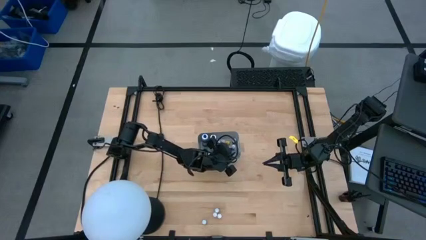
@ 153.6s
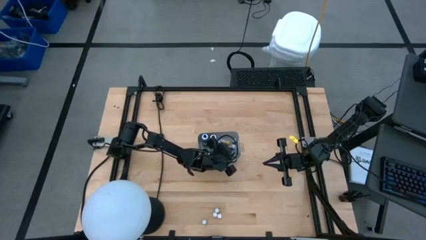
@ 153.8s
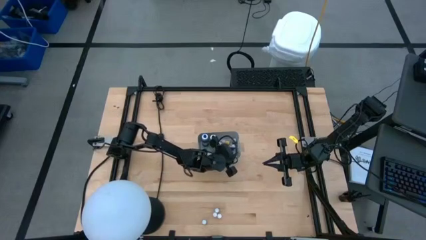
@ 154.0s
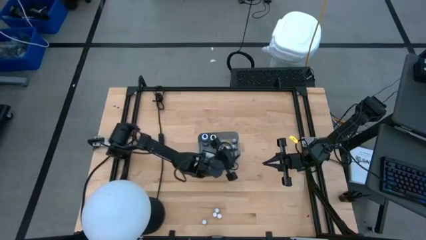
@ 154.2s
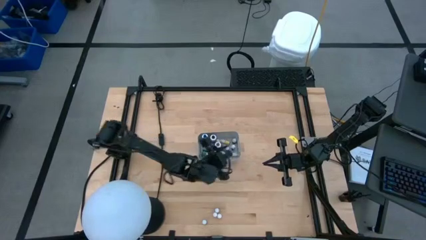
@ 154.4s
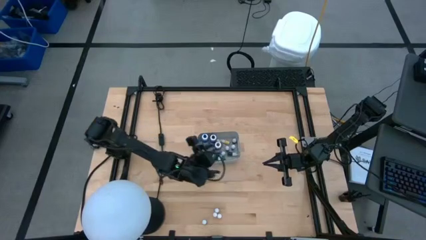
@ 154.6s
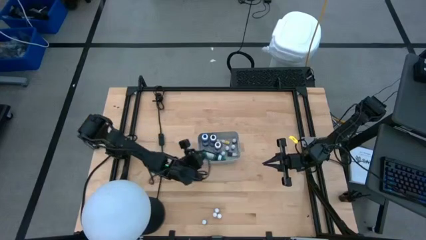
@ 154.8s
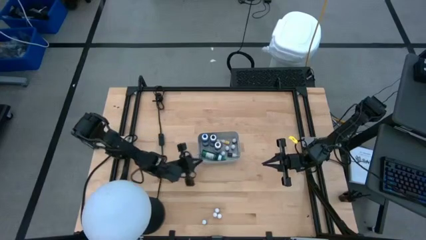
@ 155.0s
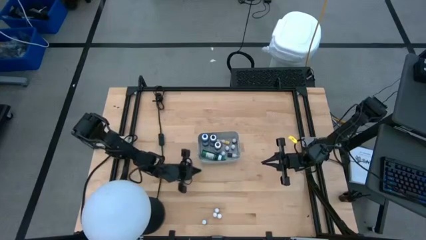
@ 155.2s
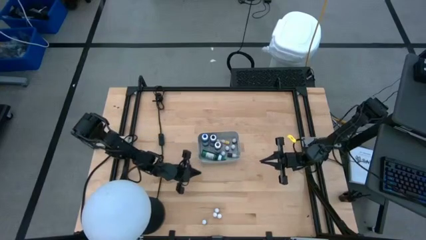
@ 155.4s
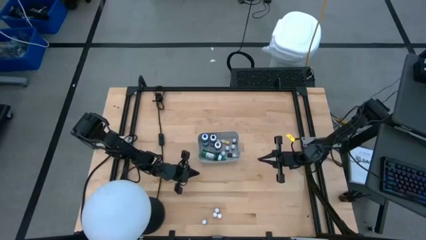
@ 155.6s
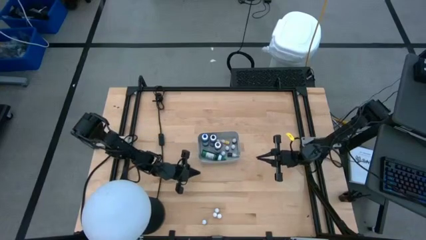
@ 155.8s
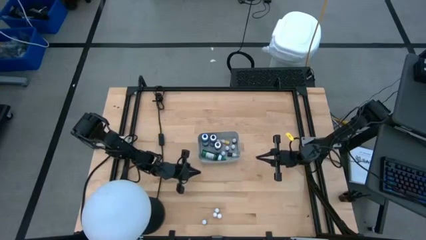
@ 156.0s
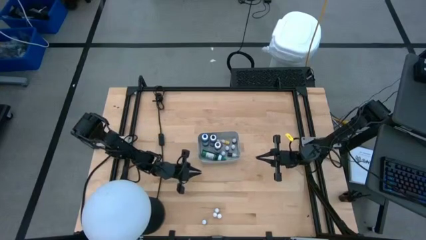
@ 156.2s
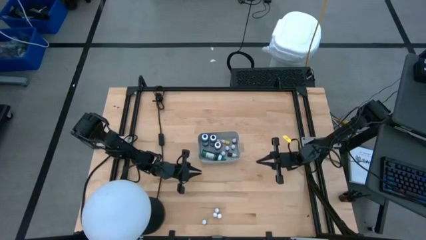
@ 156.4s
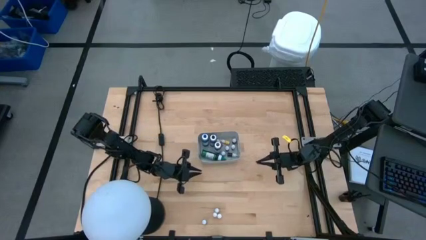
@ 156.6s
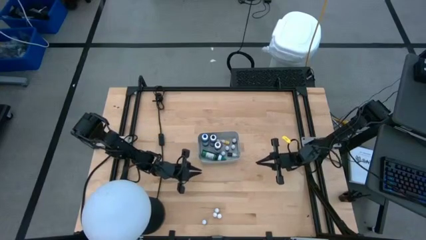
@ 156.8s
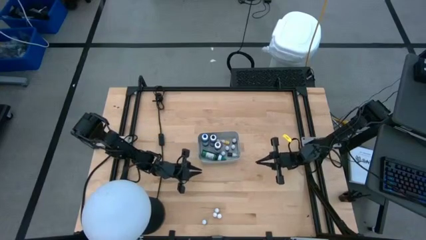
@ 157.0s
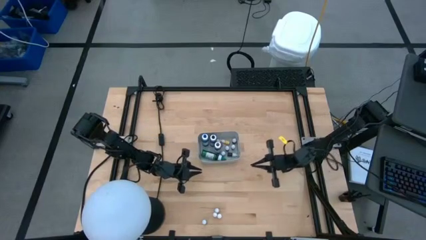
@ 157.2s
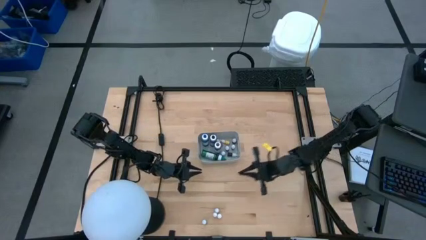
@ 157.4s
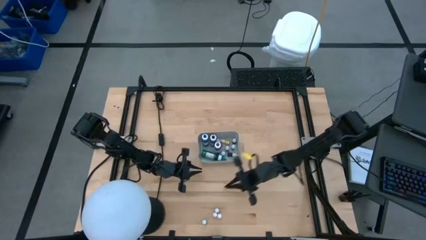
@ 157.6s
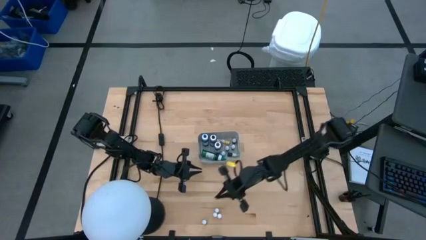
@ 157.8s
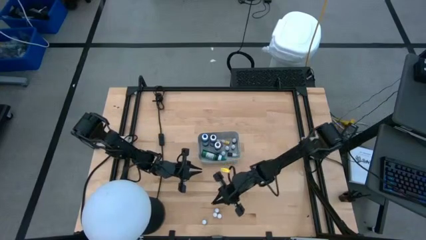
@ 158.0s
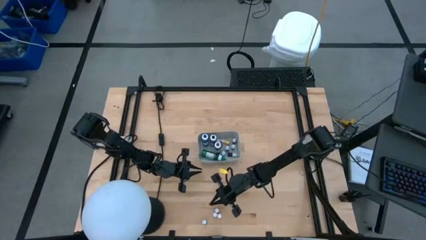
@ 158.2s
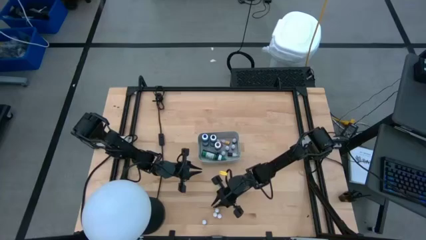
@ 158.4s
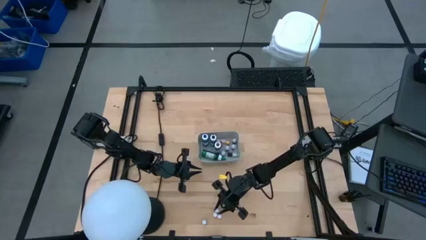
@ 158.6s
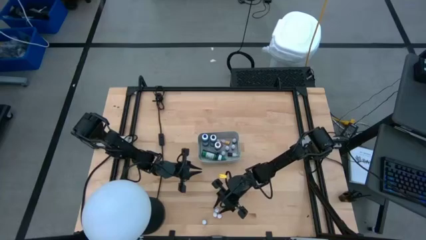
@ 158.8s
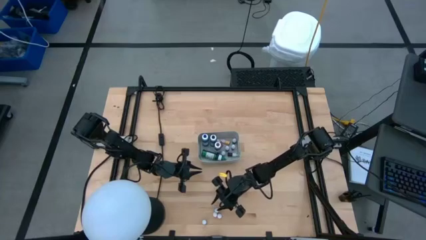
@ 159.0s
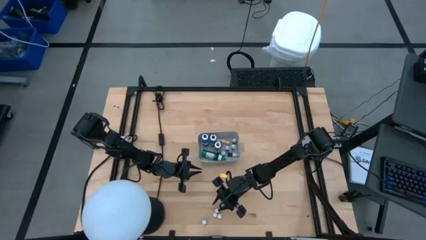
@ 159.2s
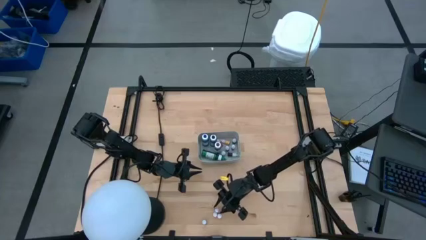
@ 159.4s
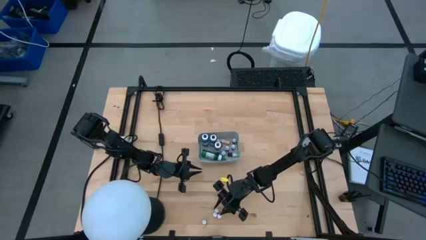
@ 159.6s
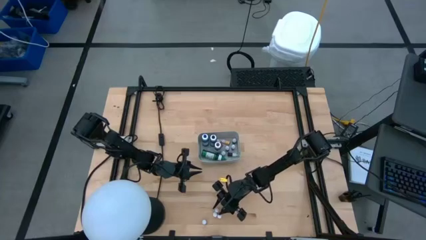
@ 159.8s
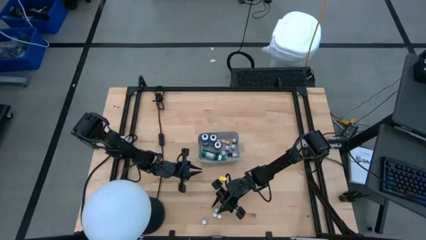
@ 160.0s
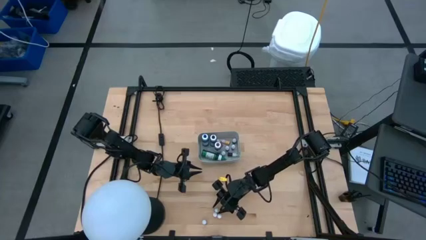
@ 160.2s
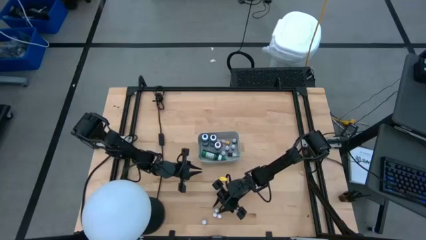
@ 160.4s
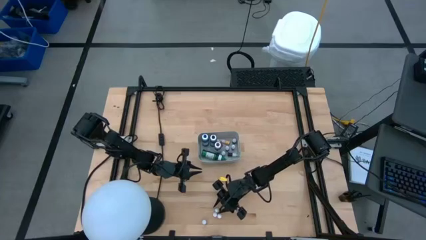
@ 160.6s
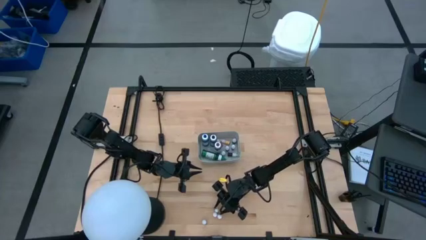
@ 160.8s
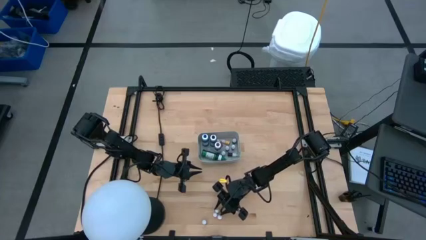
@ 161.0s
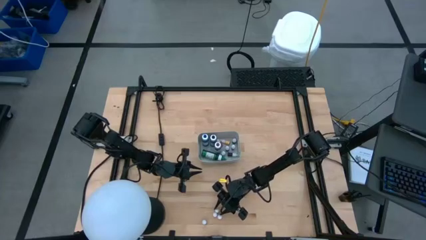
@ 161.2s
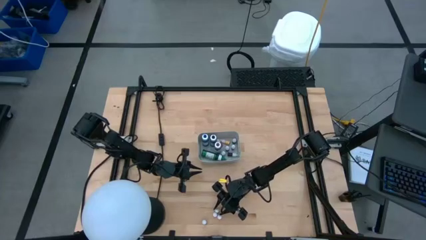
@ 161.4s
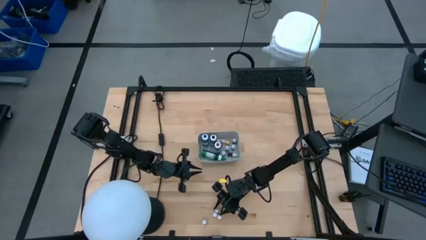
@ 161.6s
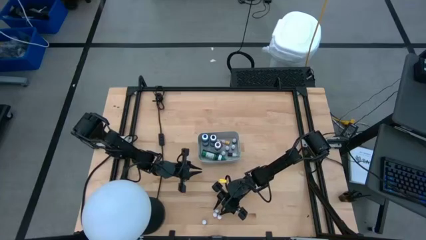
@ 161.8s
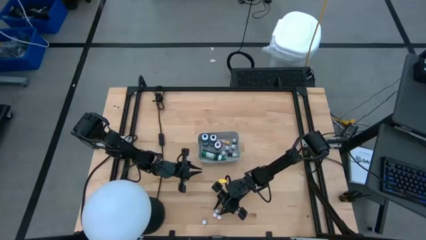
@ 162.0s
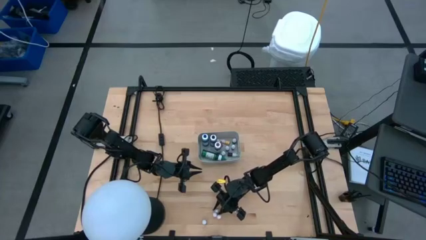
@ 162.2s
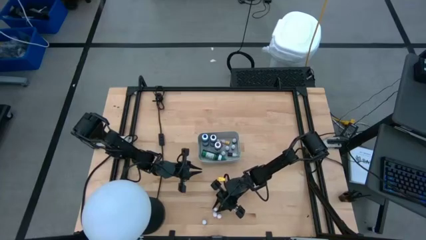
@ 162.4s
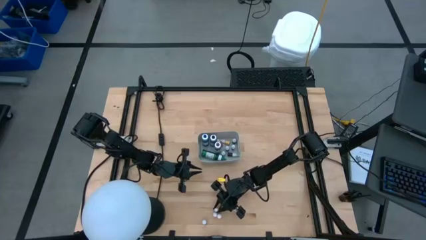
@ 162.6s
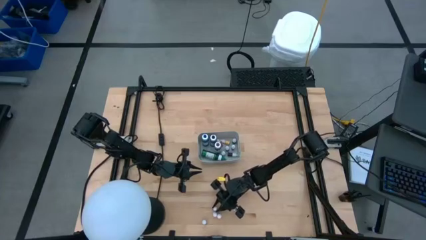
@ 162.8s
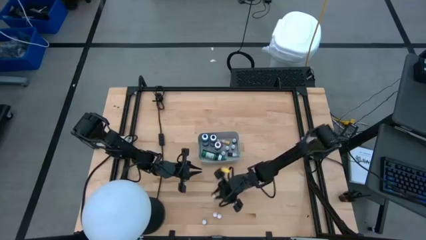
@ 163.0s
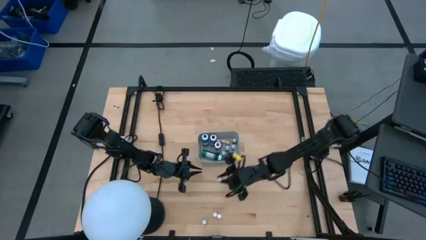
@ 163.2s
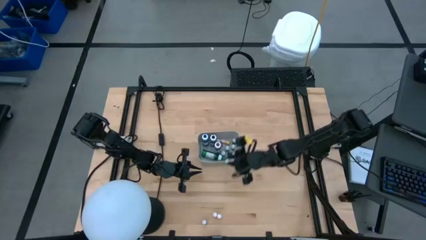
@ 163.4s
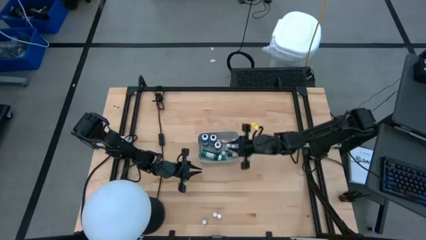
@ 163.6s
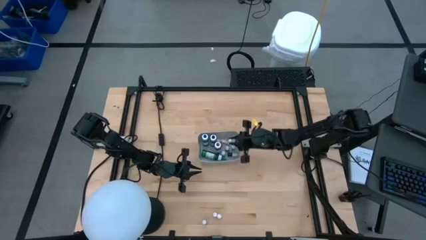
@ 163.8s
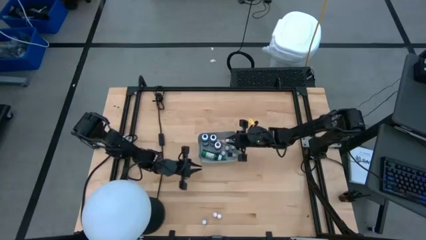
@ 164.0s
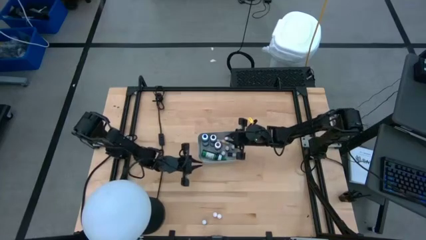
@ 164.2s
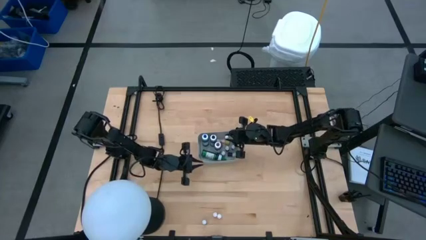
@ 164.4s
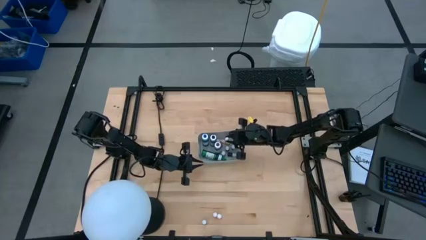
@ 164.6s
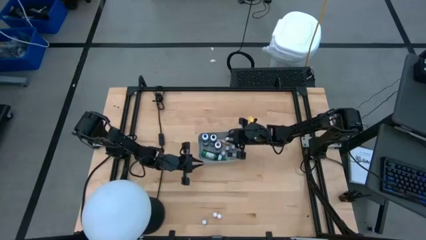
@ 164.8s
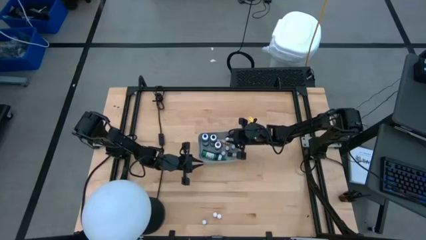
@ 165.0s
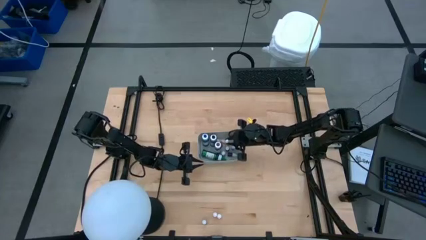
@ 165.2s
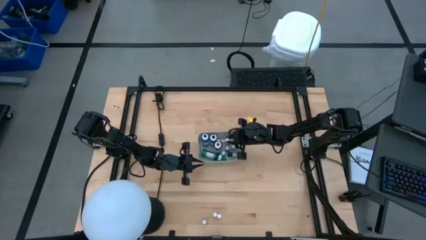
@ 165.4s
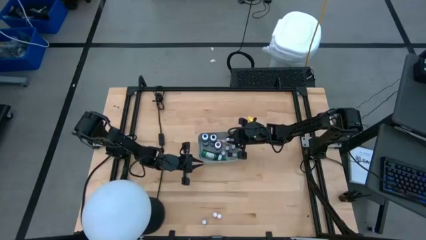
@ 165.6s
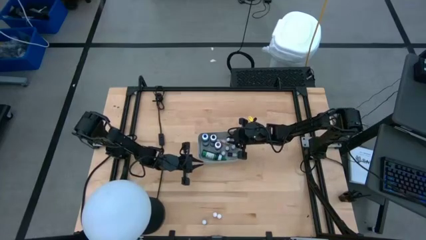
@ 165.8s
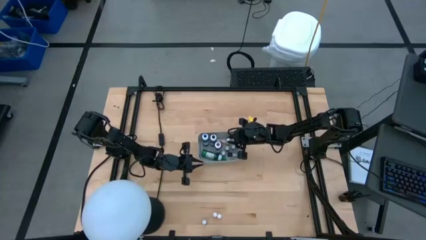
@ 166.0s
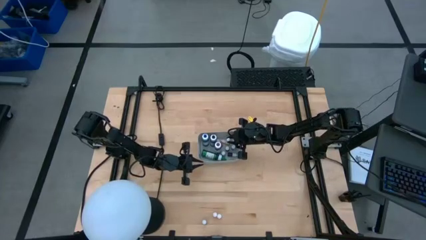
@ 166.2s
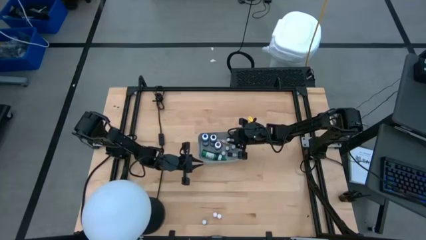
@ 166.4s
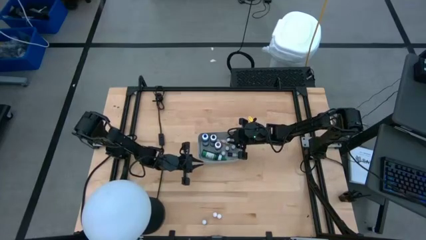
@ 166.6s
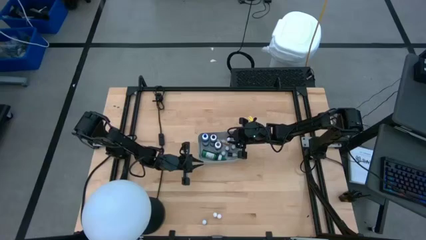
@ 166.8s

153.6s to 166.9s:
Task: Pick & Place food coloring
Put the small blue food coloring bottle into the gray bin

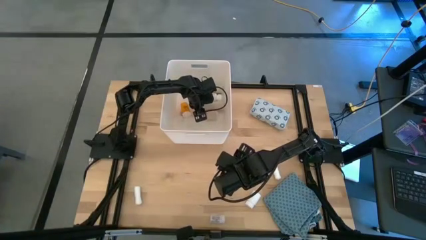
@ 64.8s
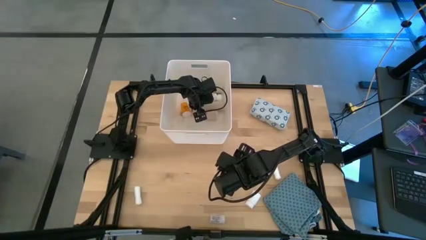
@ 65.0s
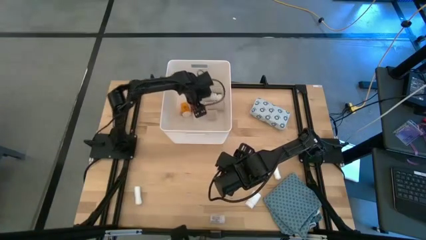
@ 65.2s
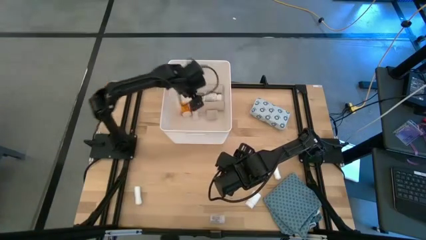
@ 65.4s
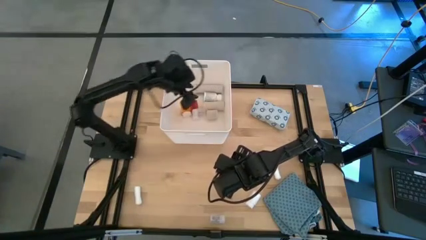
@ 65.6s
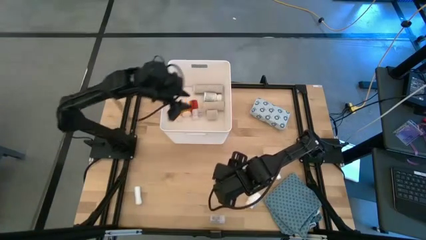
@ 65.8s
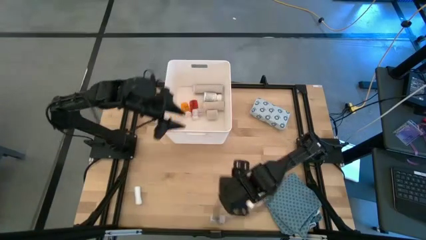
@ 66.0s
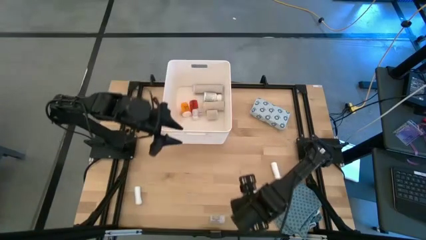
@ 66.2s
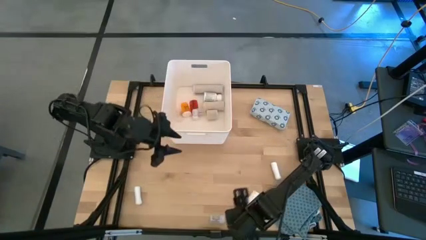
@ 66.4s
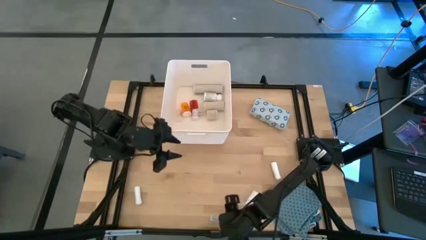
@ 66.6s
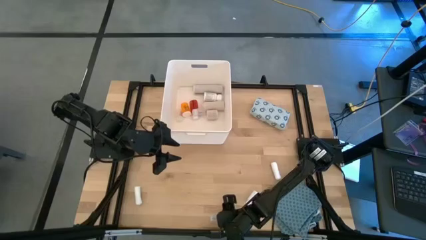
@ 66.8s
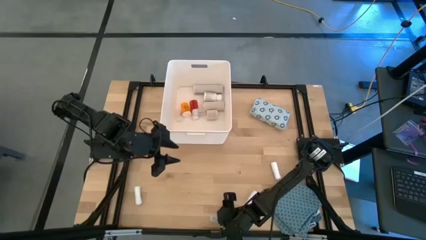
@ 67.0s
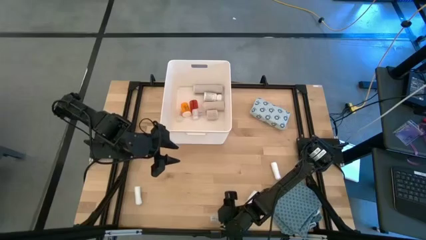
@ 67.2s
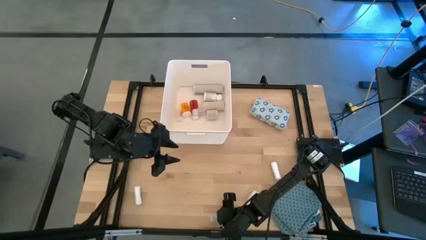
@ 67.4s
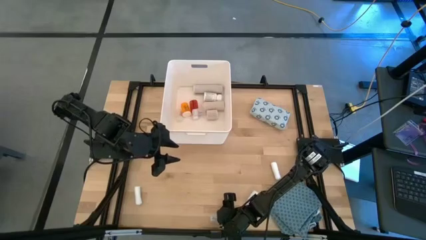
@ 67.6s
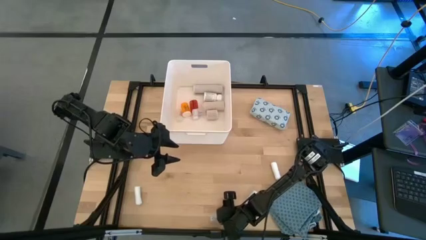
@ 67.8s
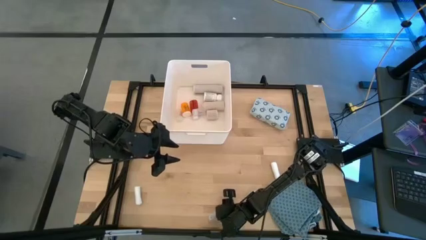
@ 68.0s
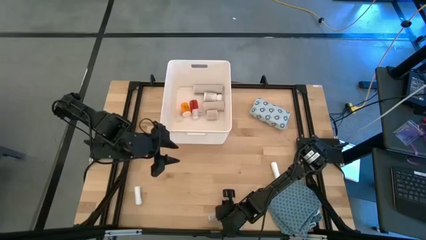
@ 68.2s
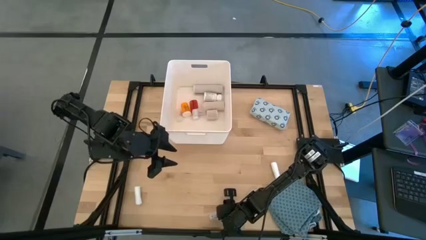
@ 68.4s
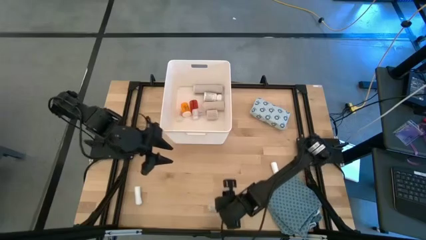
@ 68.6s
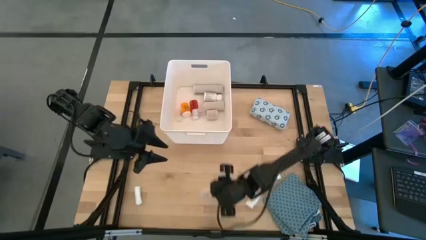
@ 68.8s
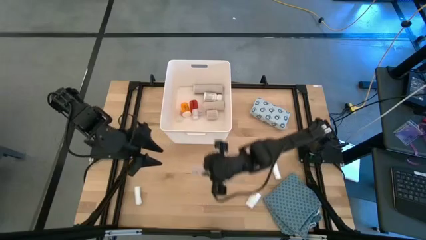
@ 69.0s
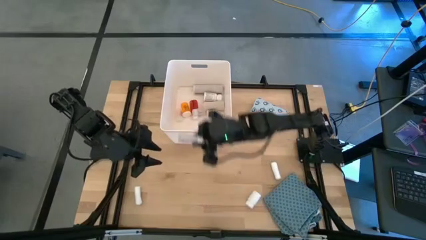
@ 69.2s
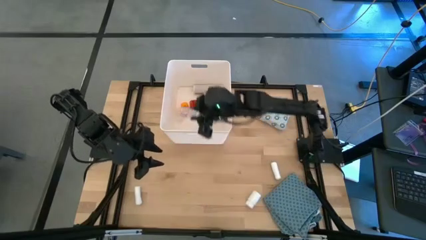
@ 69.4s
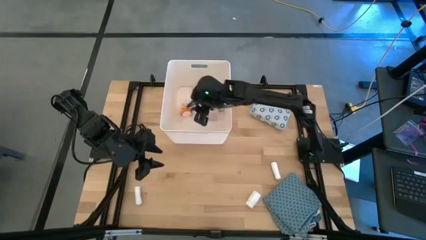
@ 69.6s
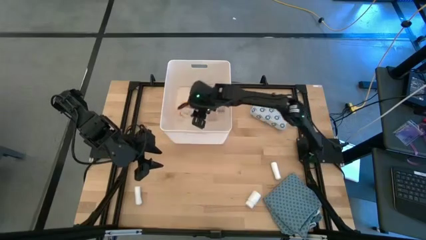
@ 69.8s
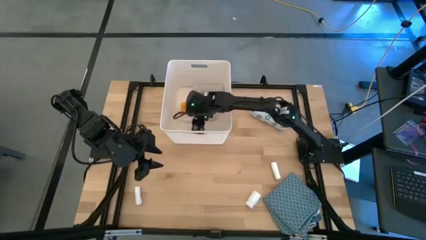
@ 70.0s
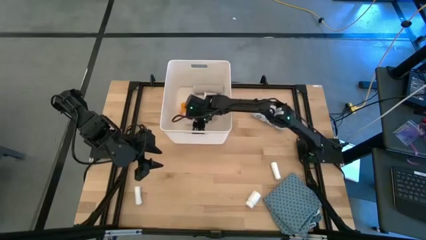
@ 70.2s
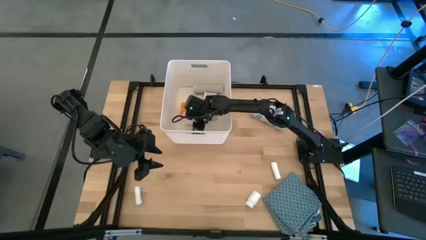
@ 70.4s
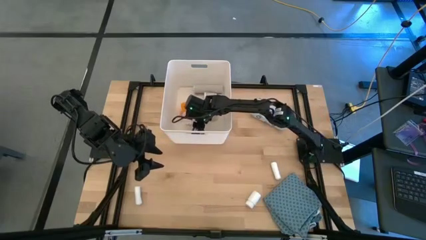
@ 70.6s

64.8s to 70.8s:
Task: Pick & place medical supplies in basket/bin
Put the transparent pill bottle into the white bin
